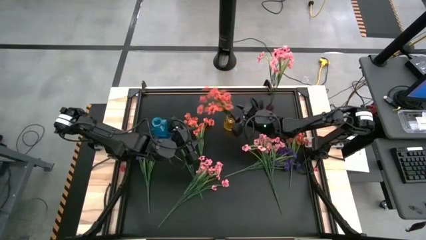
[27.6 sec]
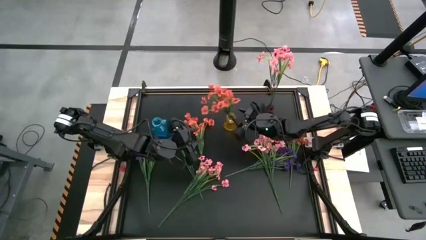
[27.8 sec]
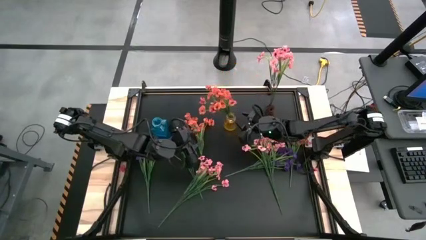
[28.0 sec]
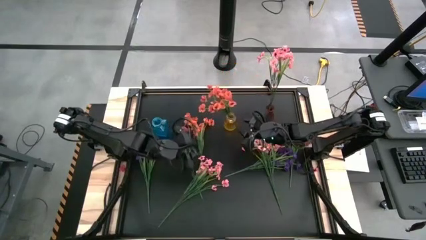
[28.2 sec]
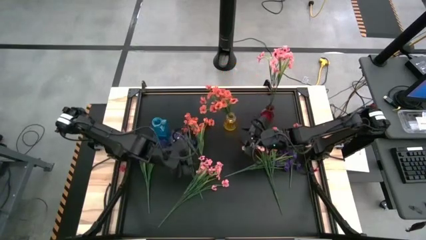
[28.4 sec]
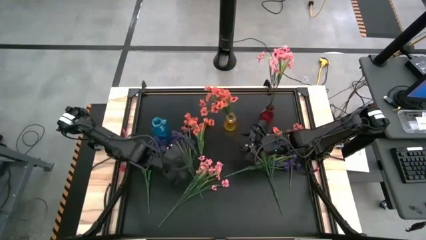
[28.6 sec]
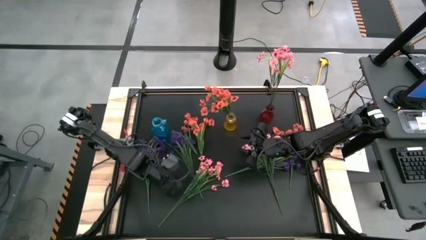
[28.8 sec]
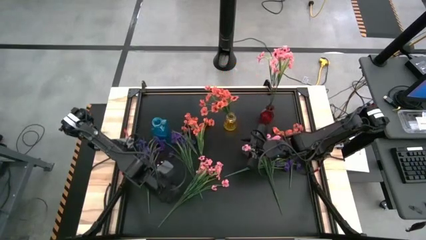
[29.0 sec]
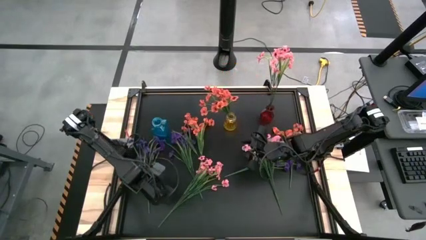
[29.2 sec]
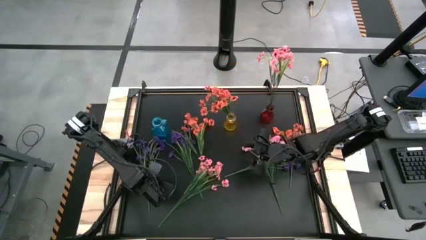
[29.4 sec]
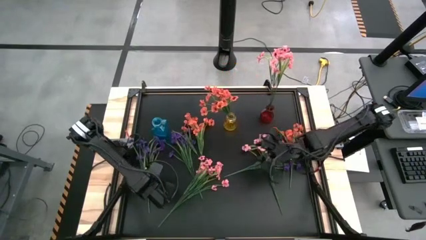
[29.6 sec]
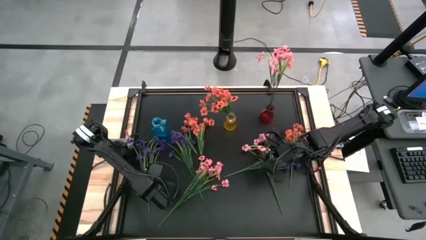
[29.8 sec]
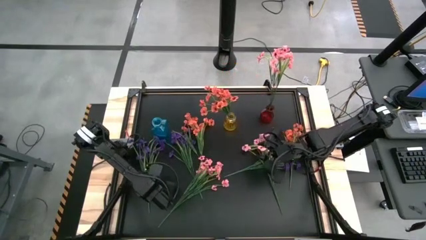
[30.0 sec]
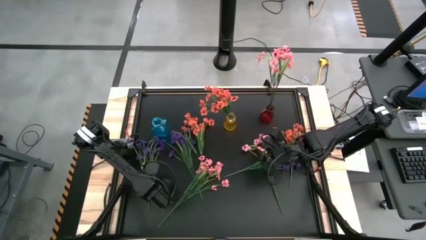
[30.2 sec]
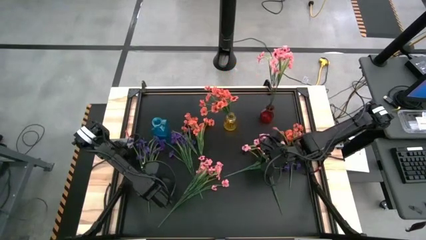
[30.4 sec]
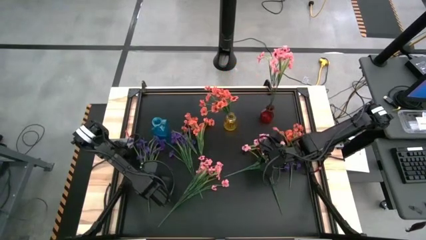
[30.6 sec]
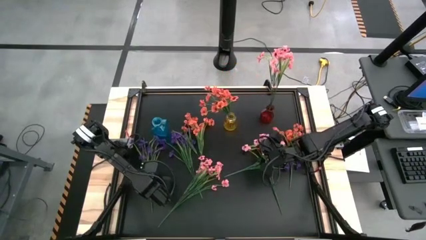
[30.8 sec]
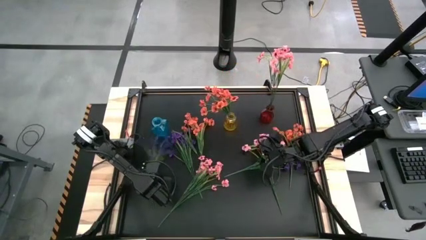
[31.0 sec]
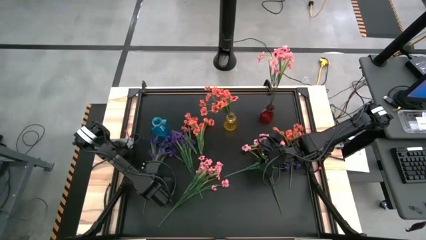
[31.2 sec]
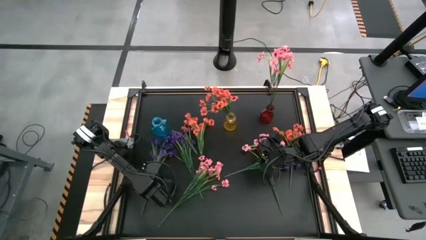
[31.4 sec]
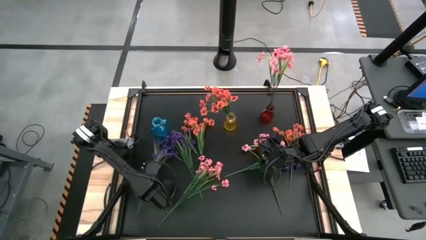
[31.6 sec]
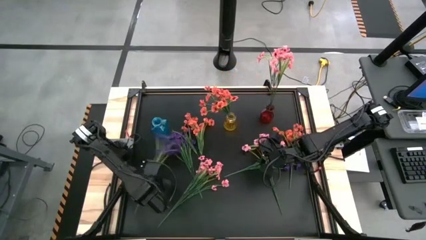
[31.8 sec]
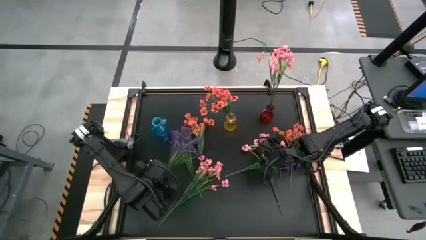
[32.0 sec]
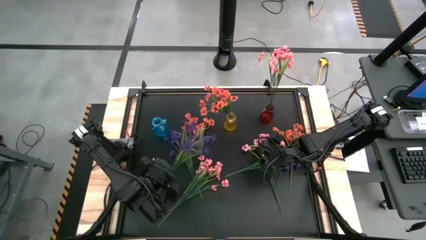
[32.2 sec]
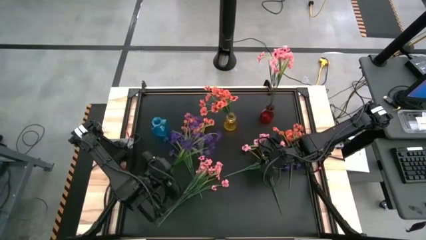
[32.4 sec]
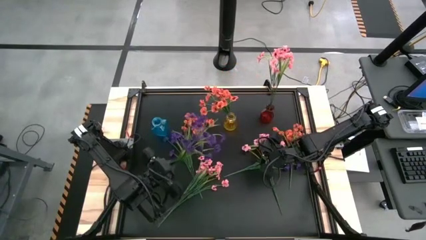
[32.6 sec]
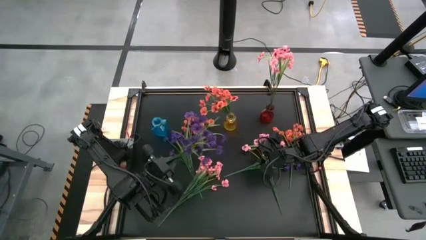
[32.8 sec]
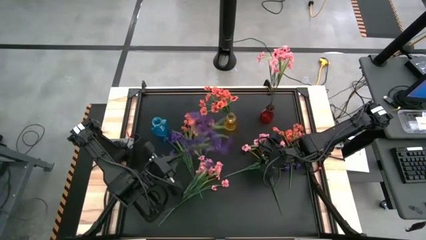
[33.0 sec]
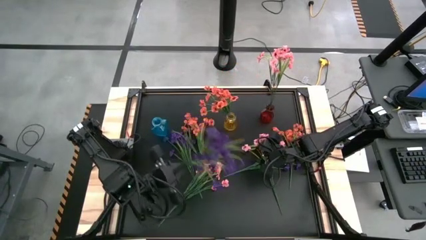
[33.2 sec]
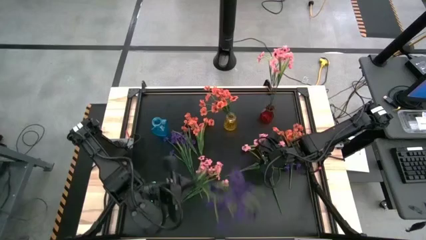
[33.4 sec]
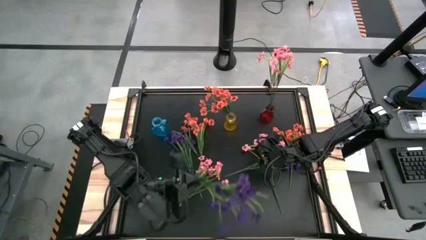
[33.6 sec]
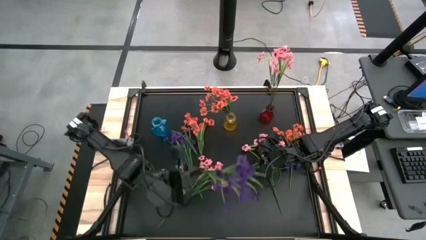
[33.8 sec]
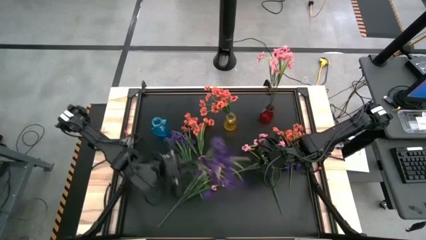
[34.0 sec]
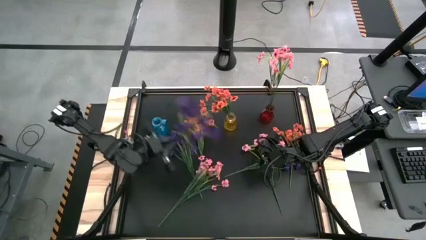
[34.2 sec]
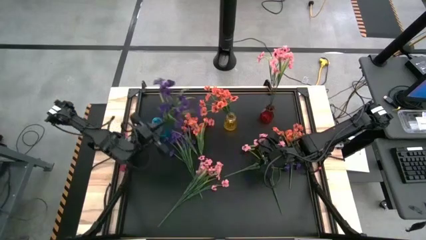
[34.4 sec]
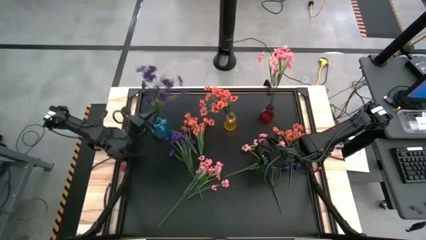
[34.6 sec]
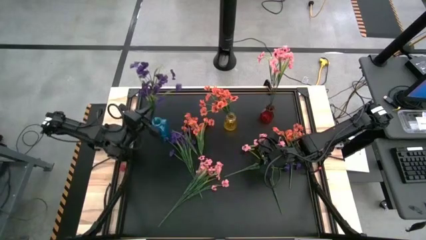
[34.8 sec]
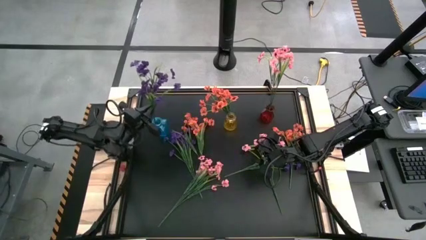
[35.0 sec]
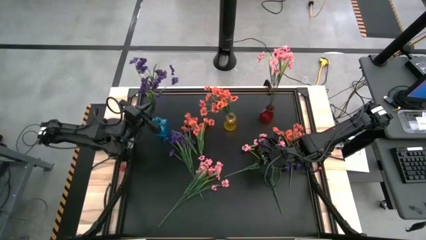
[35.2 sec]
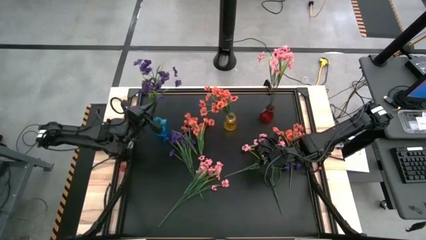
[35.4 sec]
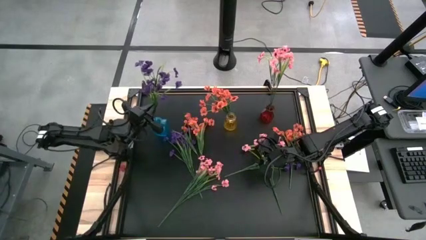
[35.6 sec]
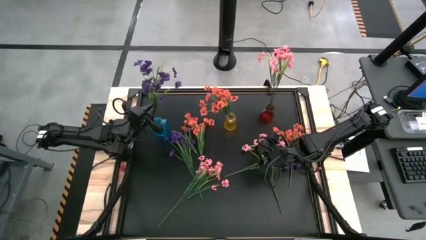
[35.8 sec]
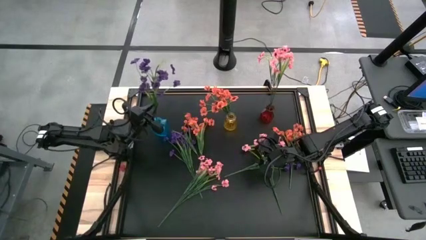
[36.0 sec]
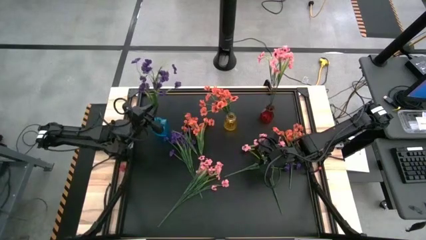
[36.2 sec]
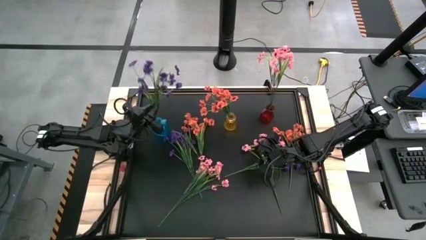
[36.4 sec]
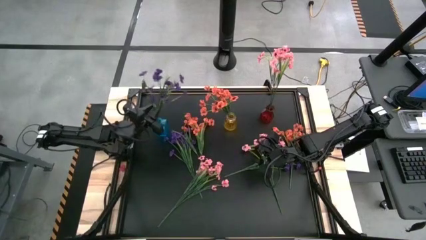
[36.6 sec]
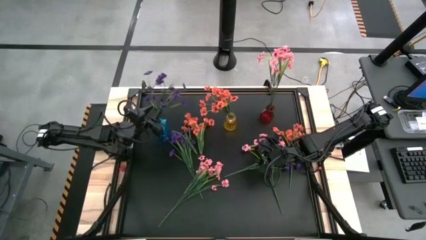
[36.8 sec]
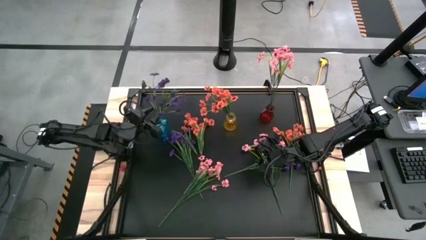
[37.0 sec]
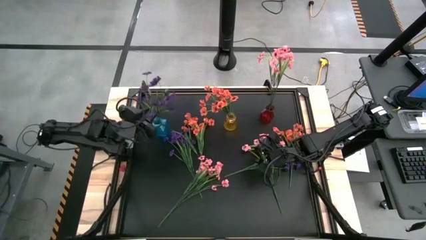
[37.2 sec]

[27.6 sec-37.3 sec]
Task: Sort flowers into vase by color
Put the left violet flowers into the blue flower vase

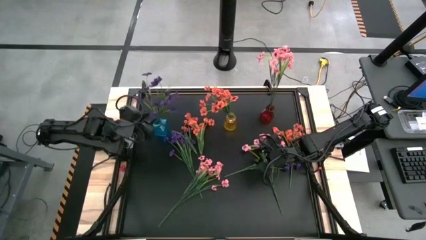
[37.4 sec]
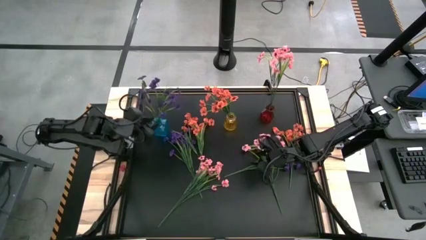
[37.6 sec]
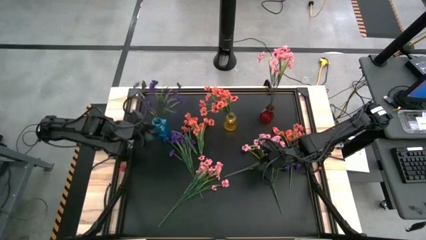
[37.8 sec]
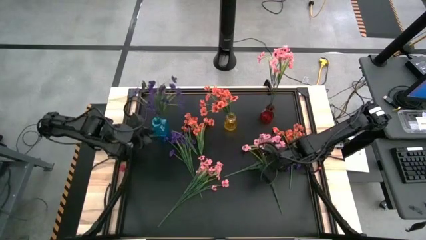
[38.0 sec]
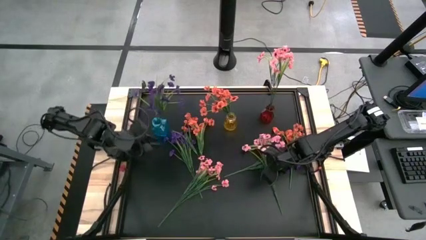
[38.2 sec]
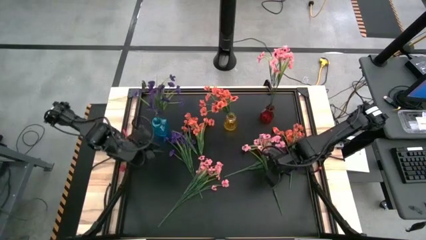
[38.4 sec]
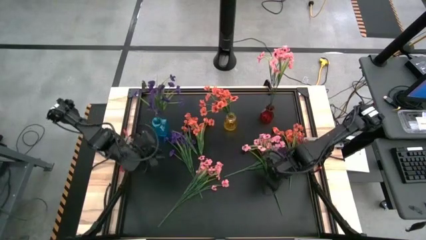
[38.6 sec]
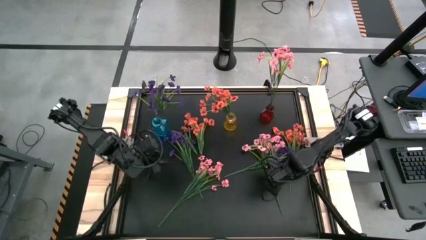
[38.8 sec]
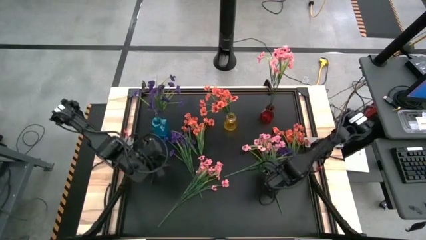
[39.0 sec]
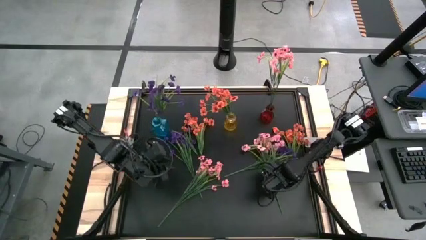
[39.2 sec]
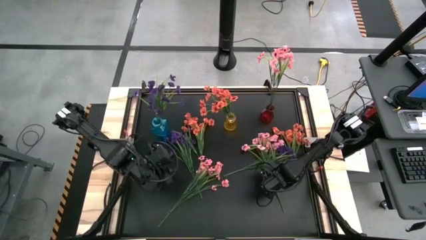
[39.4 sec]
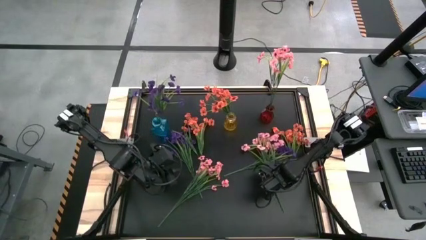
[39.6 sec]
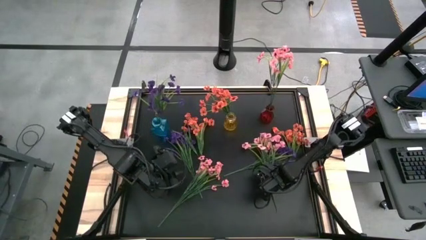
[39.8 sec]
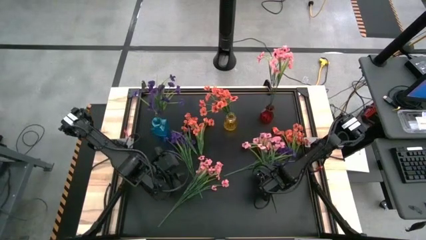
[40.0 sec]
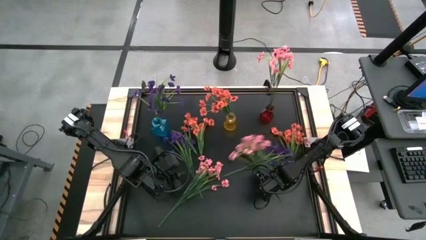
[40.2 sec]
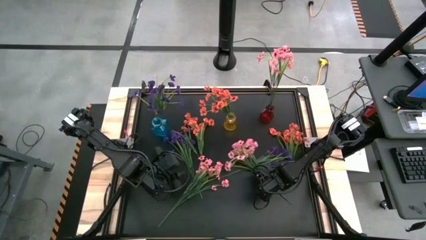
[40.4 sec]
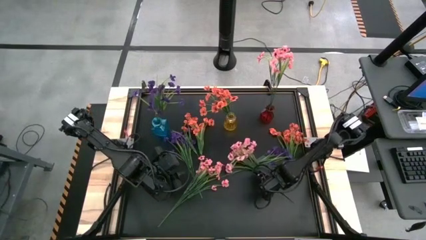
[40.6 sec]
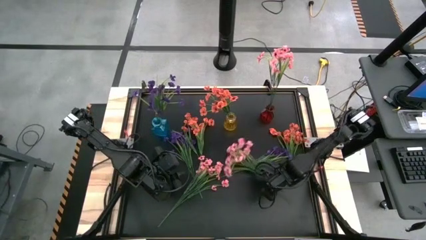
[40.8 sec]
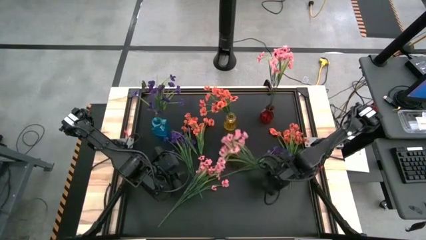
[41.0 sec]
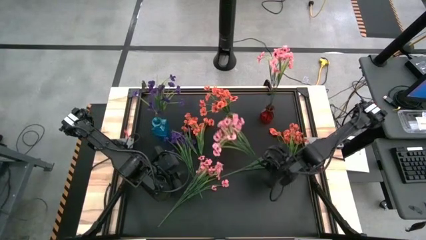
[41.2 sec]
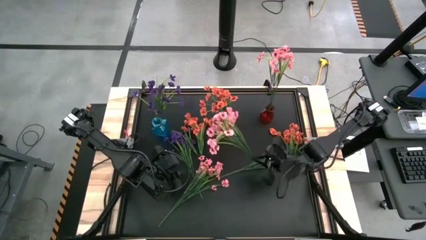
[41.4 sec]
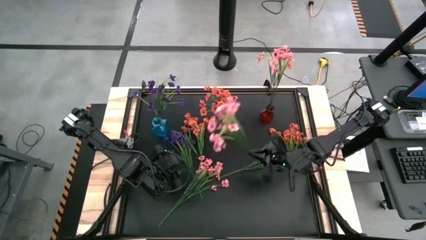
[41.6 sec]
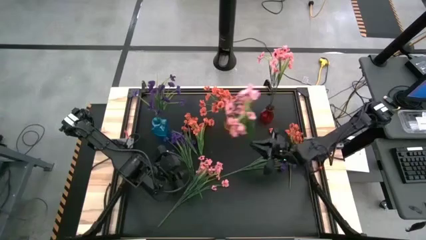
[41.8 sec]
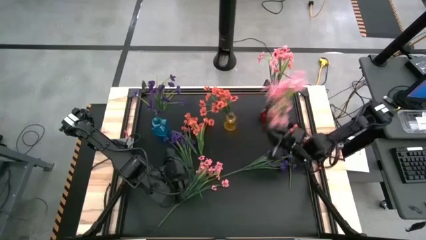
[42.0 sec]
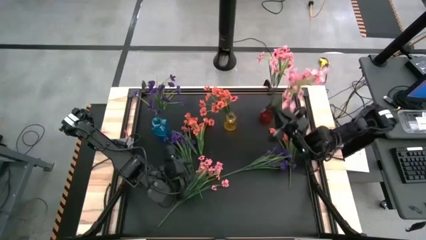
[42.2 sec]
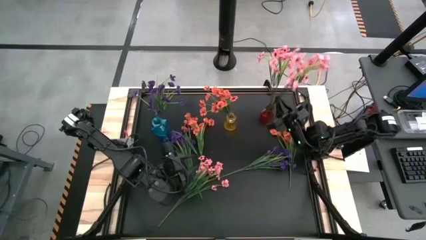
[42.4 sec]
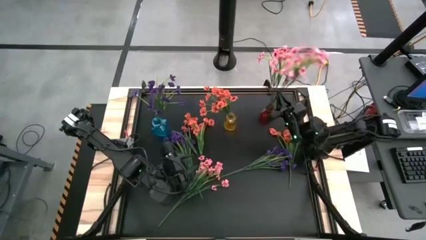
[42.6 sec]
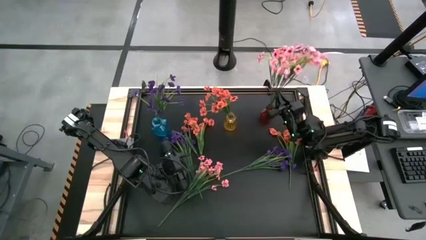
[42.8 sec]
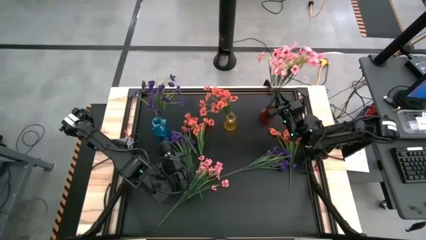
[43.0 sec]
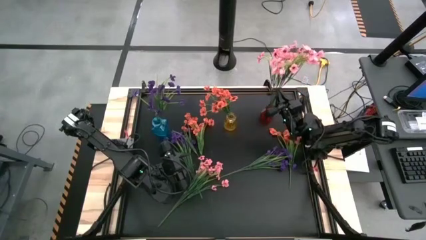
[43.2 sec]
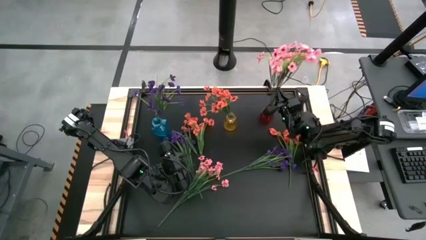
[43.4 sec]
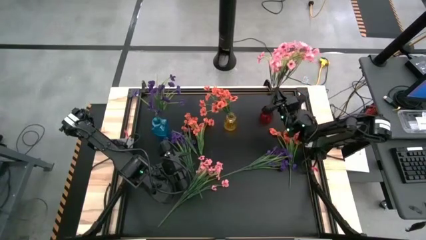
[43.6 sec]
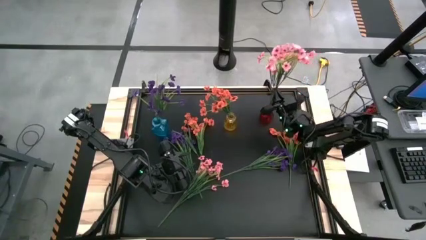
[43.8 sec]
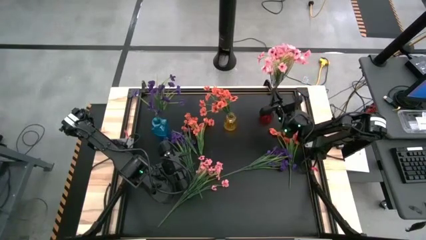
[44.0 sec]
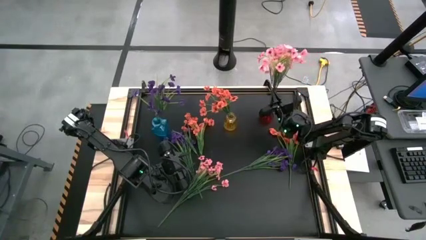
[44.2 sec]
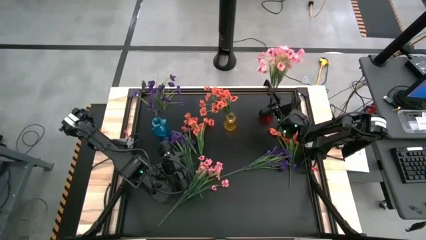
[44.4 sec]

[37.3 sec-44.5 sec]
Put the right pink flowers into the red flower vase
